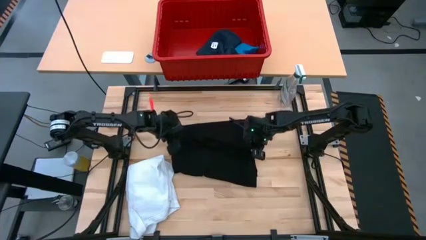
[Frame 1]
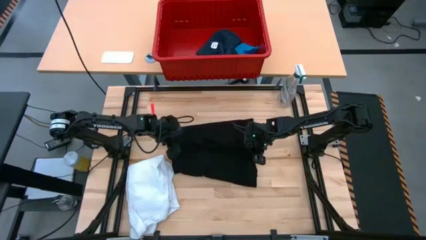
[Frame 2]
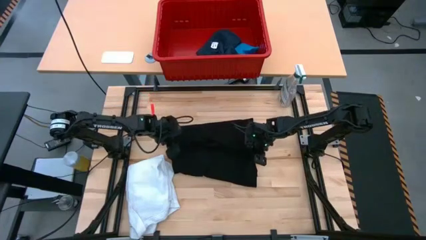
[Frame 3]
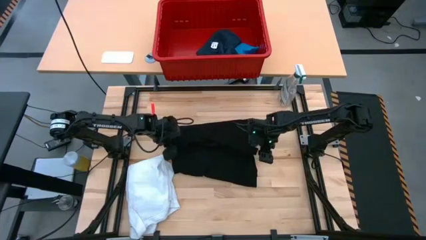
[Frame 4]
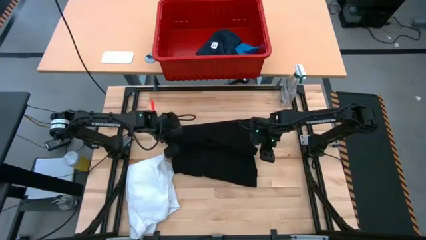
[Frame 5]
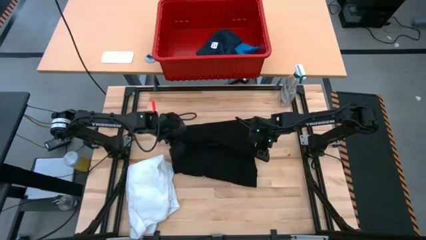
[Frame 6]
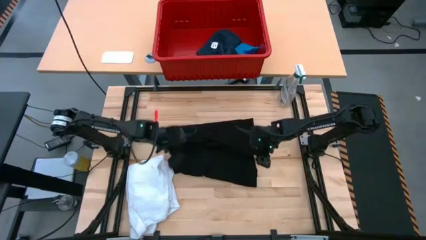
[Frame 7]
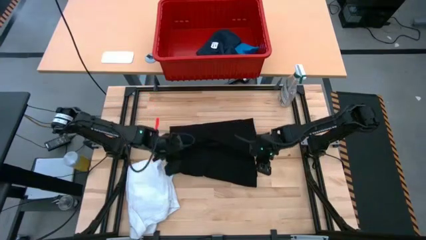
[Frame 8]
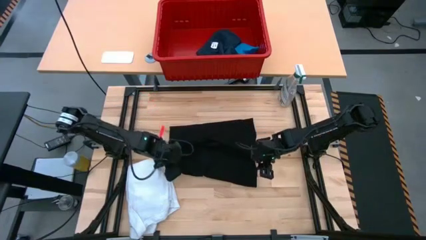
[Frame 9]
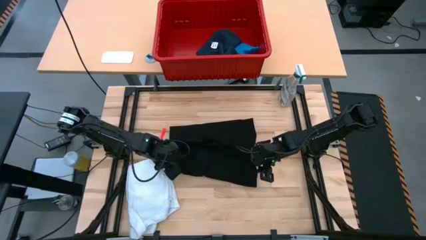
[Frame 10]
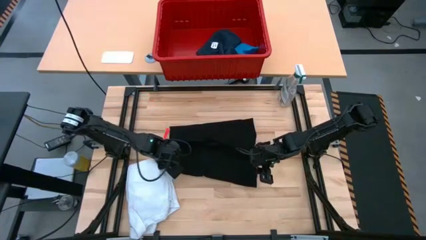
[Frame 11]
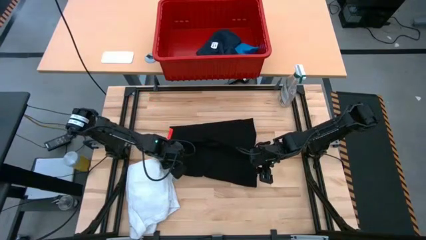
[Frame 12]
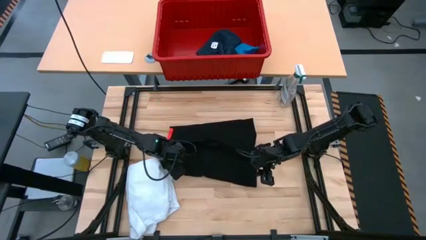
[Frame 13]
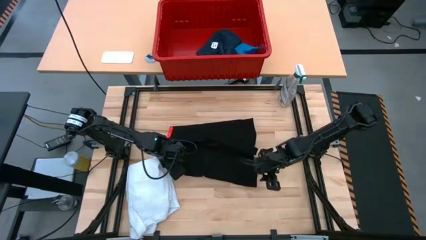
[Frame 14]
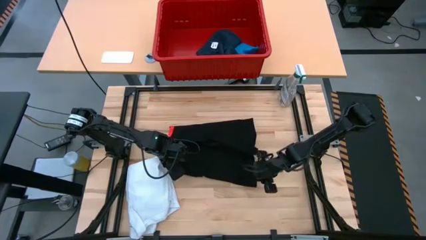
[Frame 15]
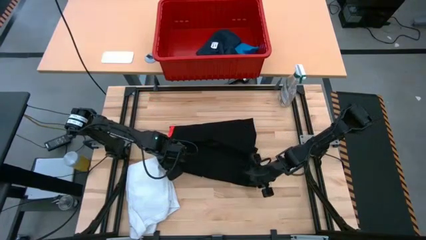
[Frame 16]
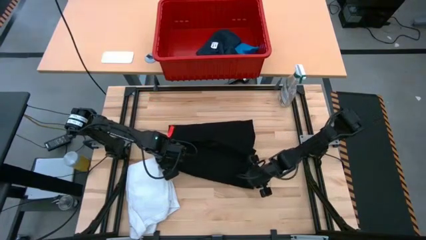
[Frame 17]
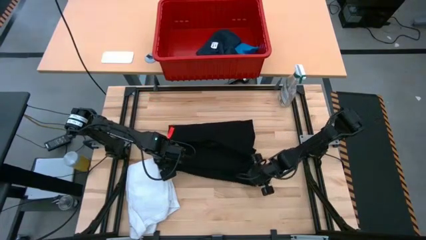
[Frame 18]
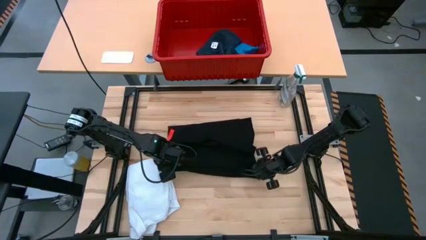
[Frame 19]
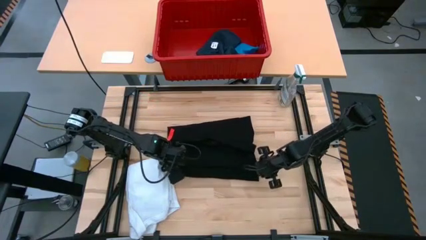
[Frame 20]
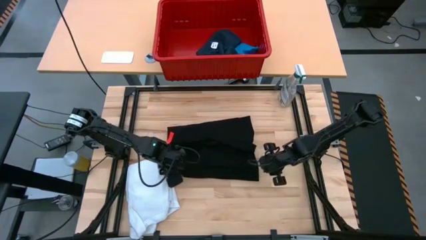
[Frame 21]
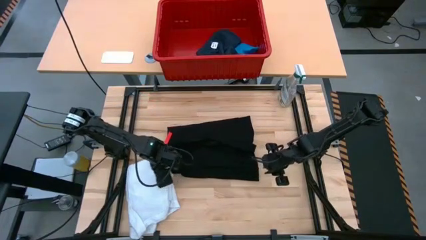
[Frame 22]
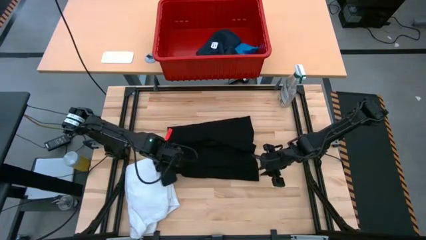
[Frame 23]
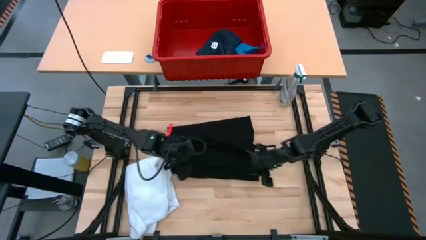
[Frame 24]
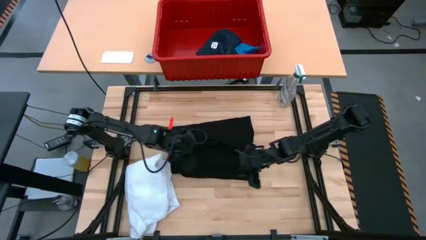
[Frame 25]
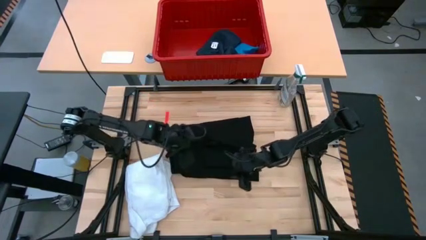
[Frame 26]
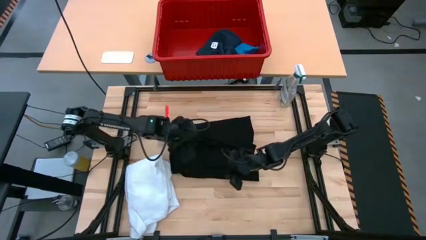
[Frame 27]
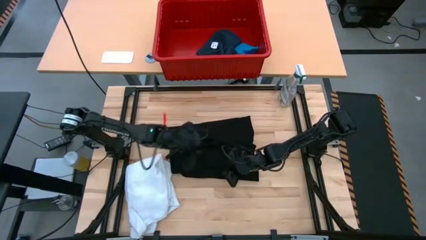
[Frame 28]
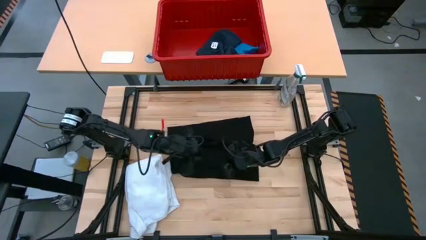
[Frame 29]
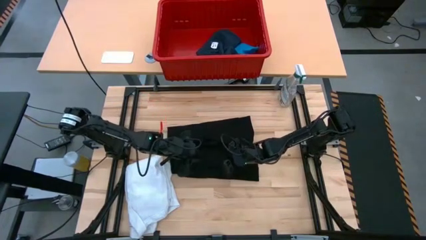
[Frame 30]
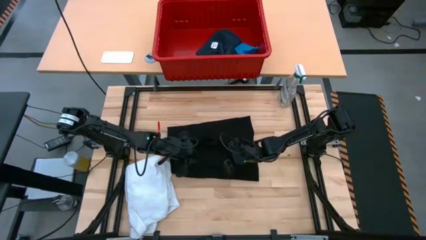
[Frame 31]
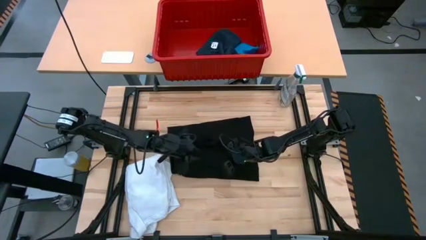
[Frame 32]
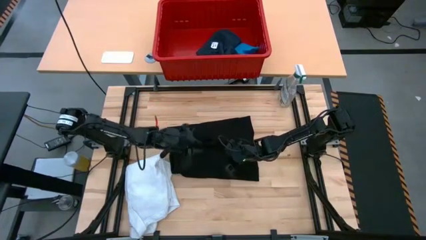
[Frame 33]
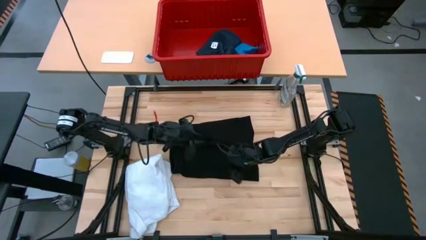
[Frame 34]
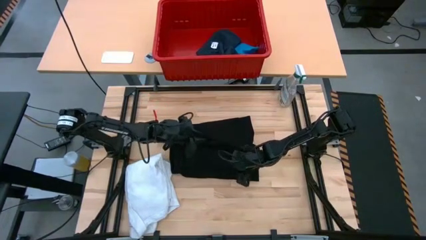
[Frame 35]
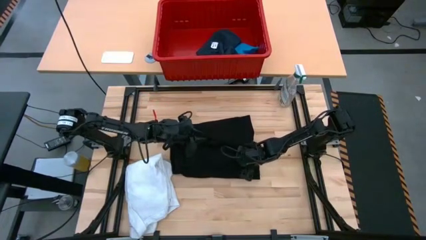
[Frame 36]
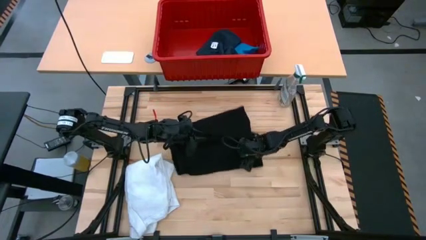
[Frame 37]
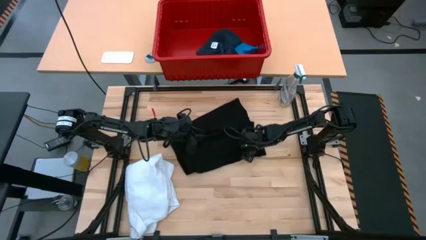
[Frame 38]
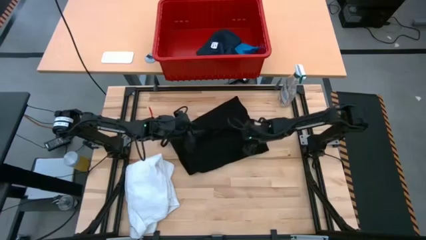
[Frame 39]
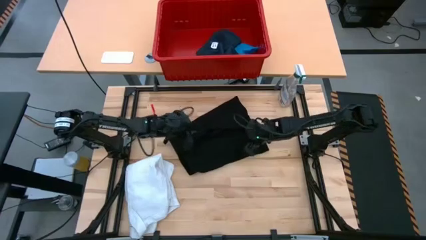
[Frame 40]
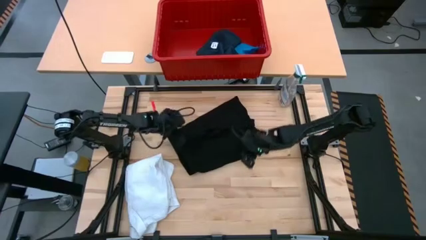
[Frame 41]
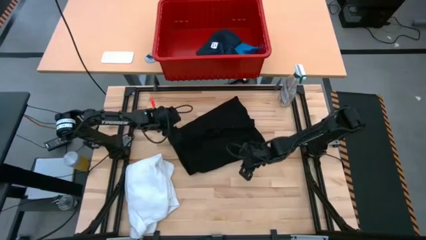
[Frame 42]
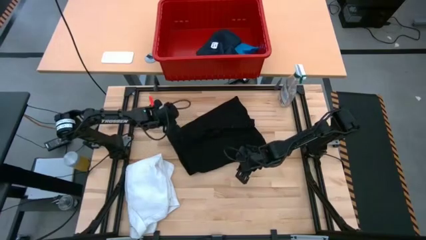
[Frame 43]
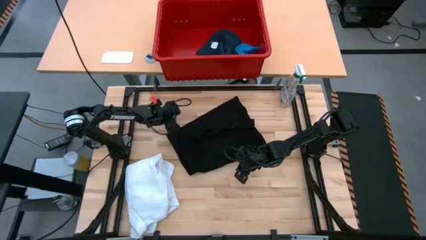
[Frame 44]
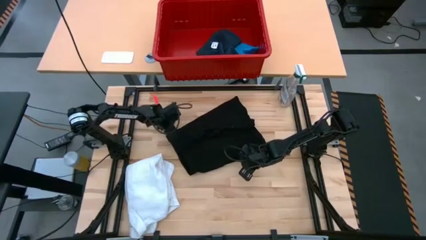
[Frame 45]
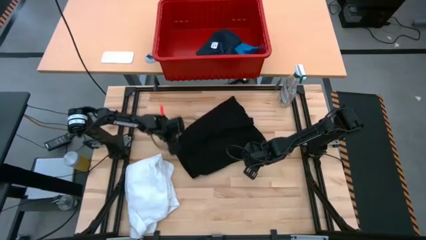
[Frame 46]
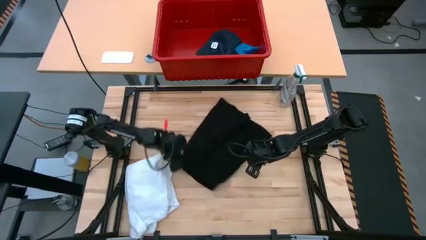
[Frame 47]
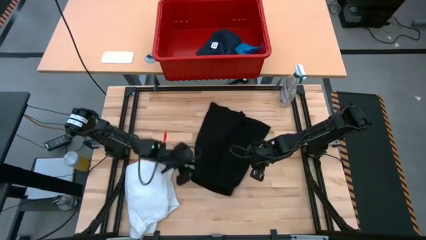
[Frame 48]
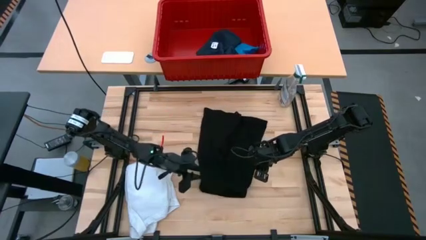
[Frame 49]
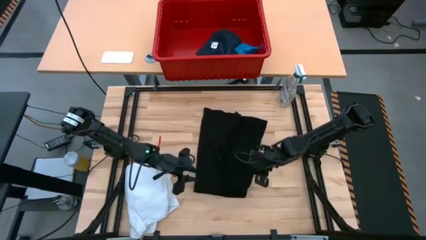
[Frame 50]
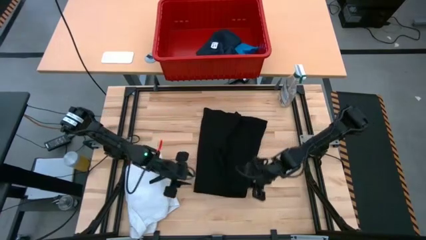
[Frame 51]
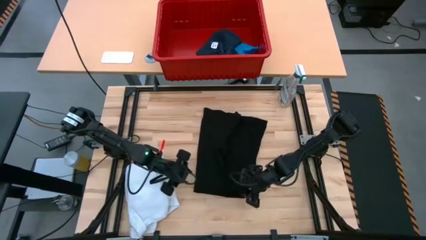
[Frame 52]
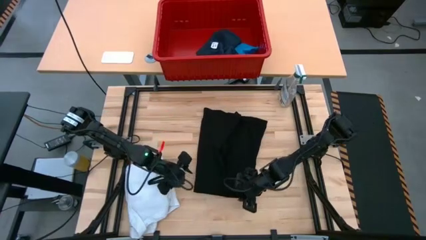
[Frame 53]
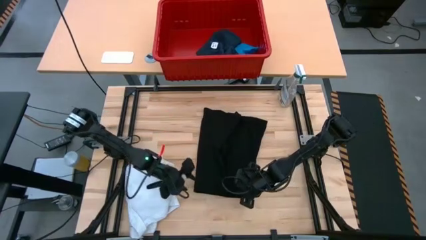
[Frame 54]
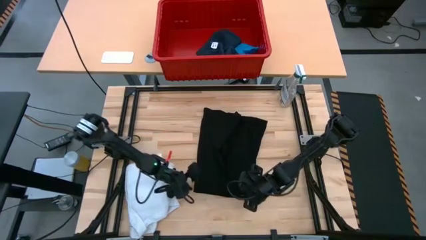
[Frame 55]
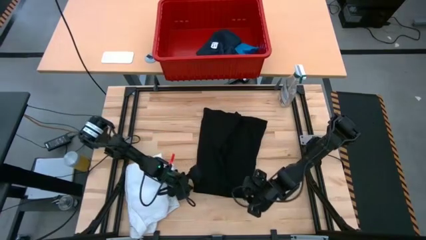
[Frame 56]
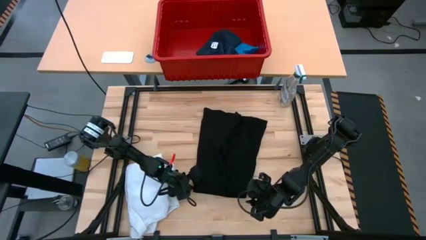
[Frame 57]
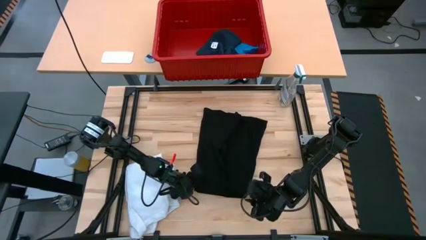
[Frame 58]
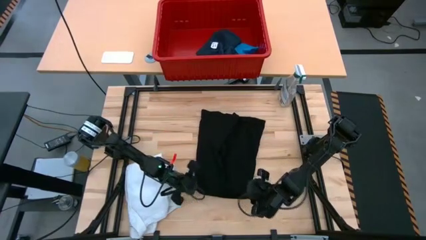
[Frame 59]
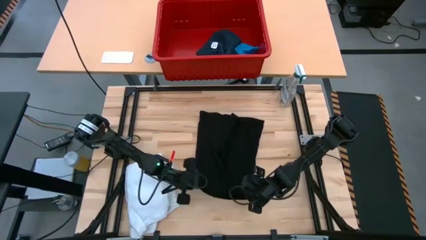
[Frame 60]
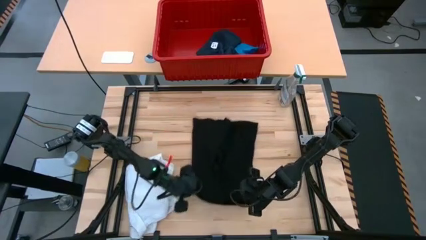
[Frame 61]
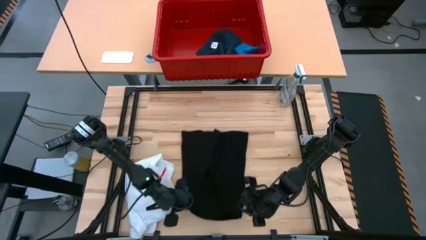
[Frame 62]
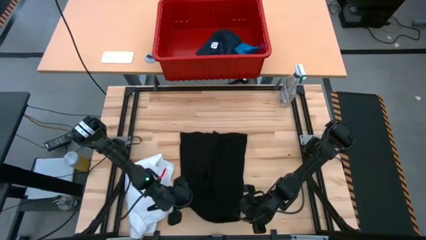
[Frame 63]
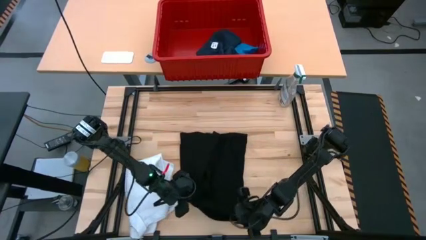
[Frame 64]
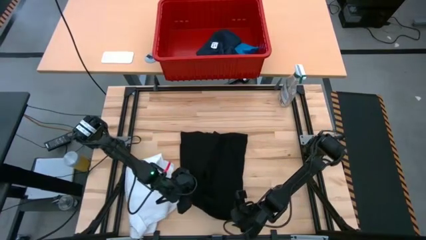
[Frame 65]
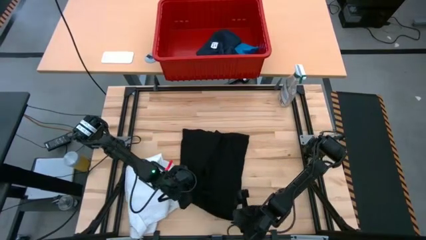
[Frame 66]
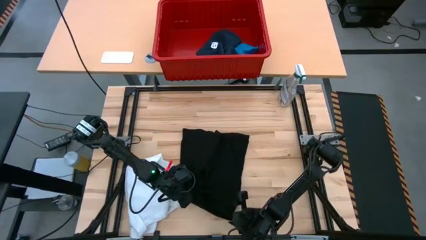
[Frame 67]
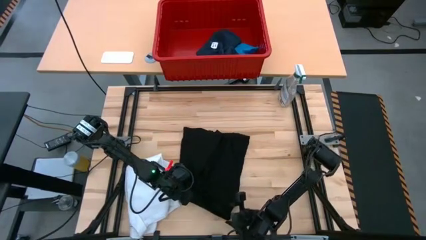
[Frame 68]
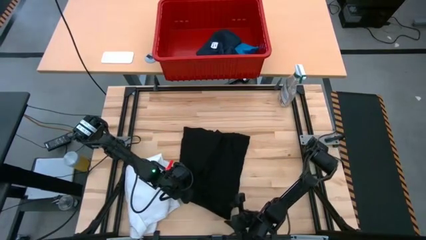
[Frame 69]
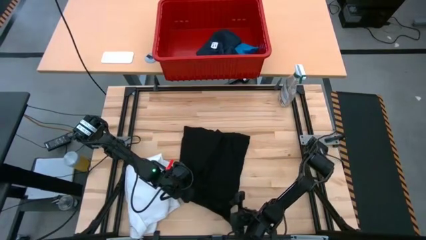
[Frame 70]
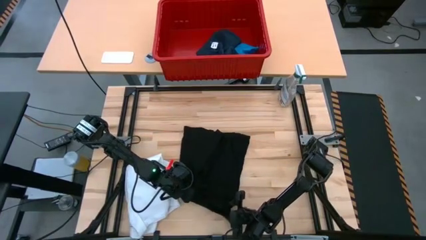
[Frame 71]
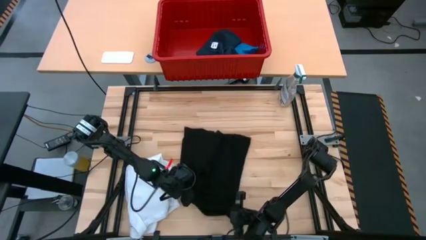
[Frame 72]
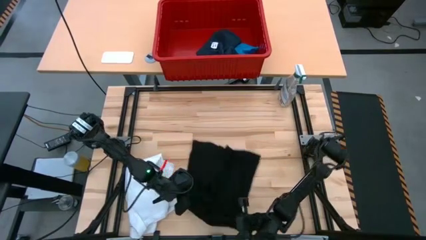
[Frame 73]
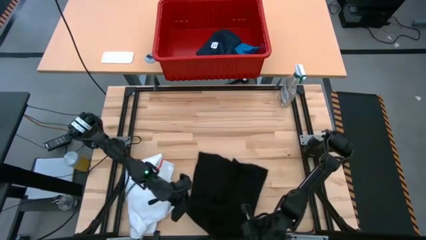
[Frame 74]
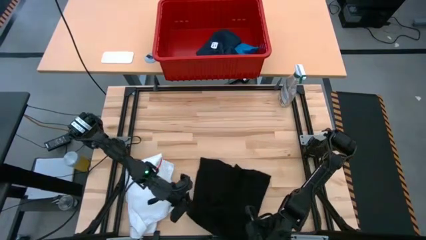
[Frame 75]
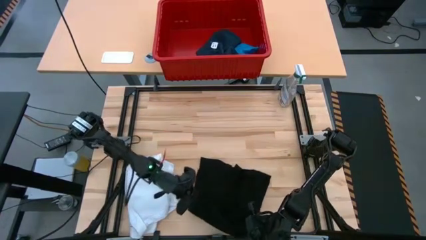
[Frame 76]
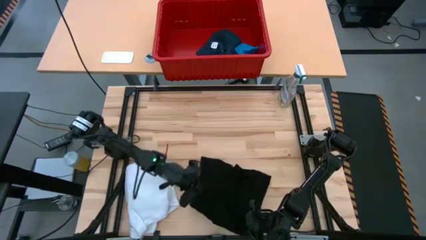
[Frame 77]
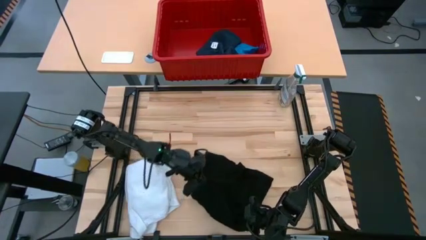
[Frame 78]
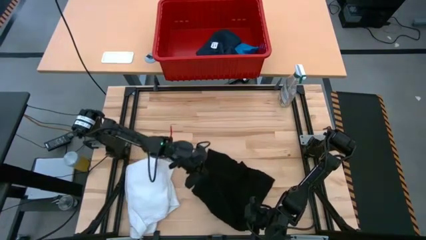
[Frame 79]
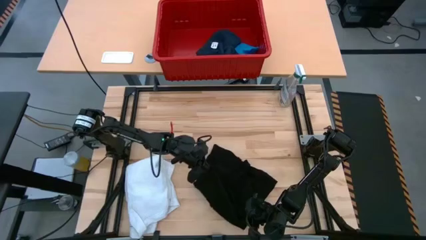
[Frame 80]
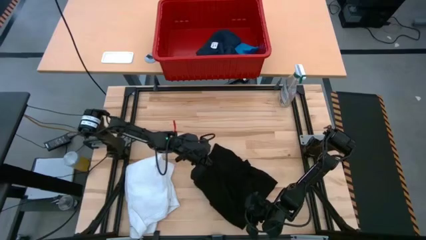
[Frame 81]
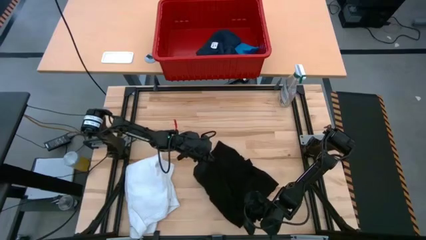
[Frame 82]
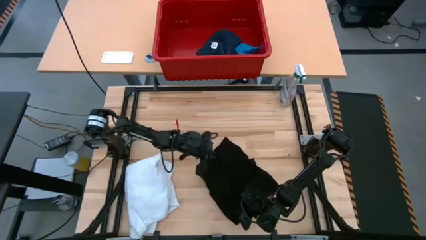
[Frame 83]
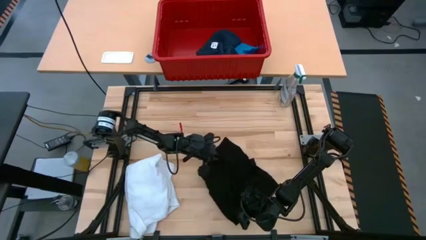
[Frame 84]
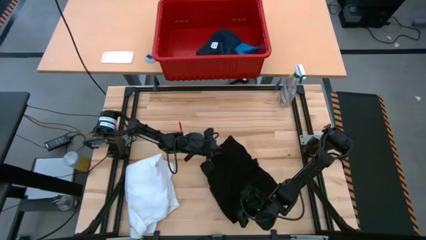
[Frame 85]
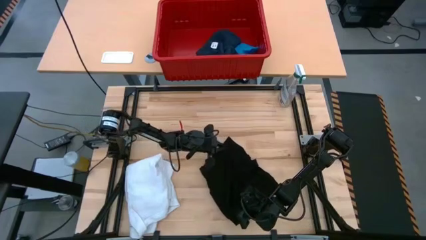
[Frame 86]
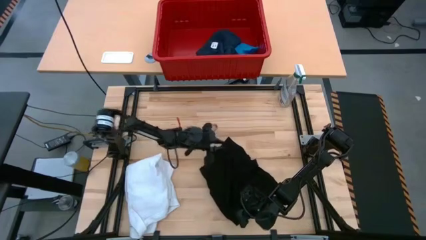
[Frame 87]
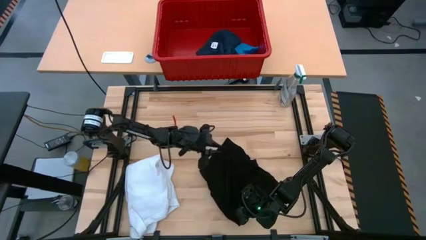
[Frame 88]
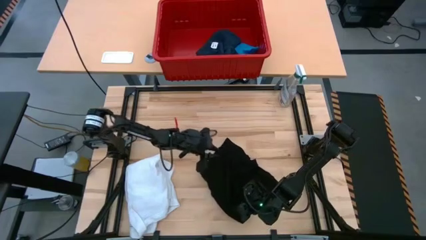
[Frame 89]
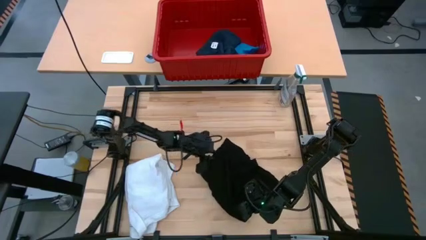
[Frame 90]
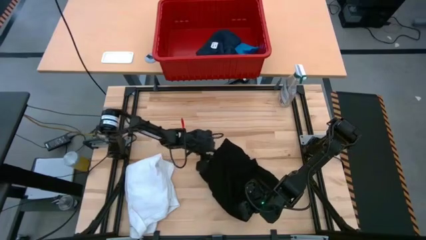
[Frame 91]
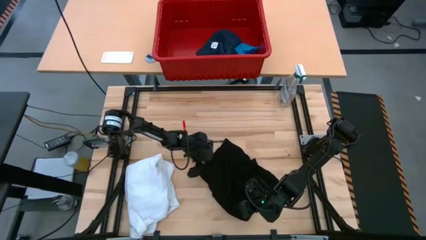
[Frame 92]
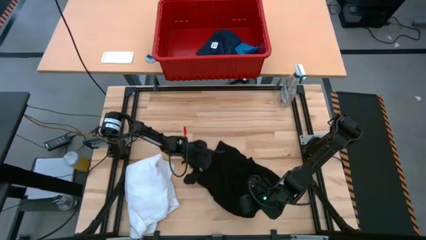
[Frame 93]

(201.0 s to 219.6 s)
Task: Fold Laundry from Bin
Fold the black shirt
